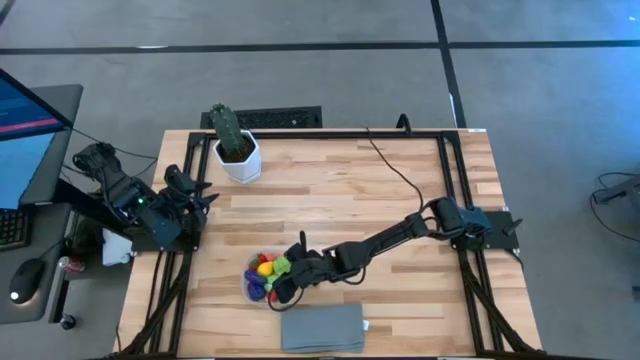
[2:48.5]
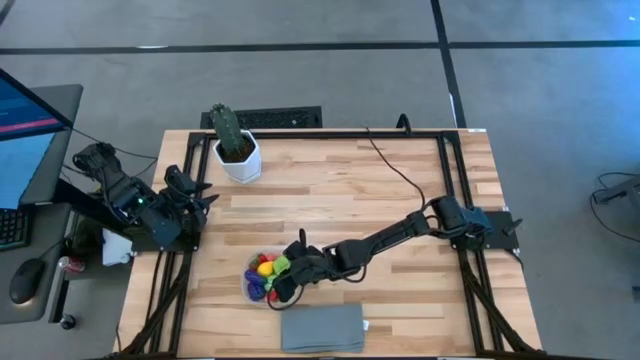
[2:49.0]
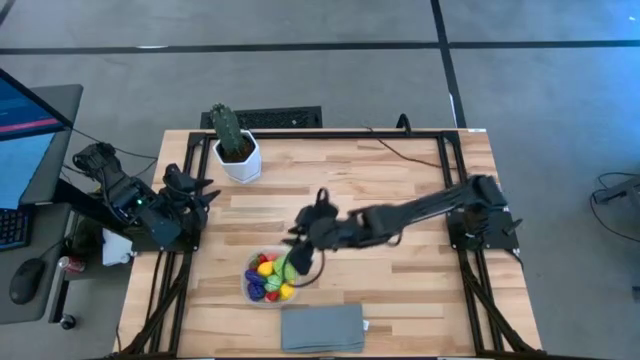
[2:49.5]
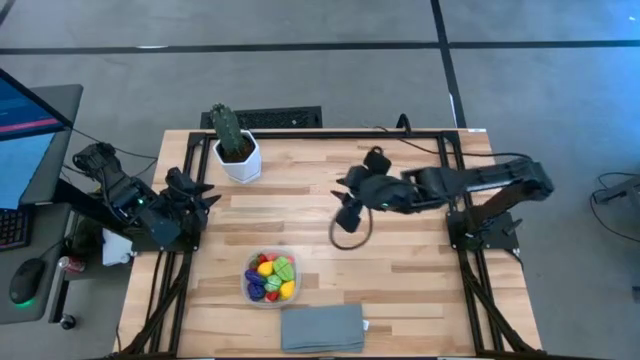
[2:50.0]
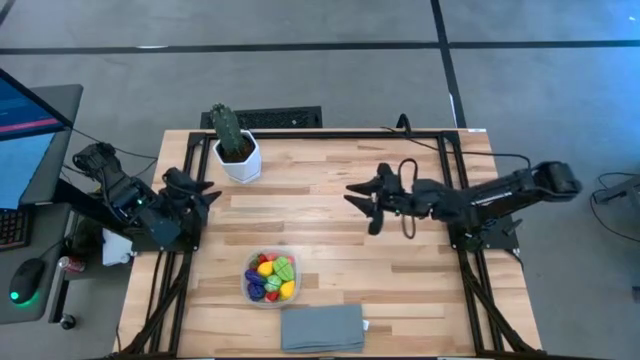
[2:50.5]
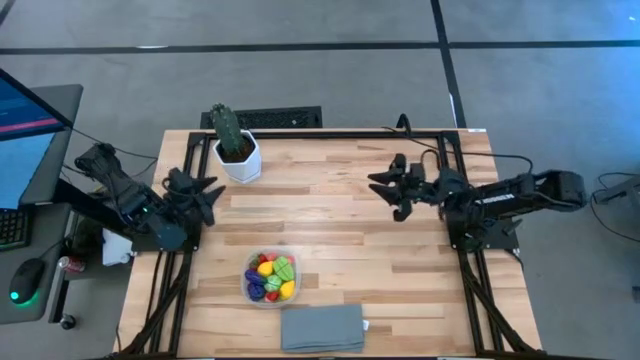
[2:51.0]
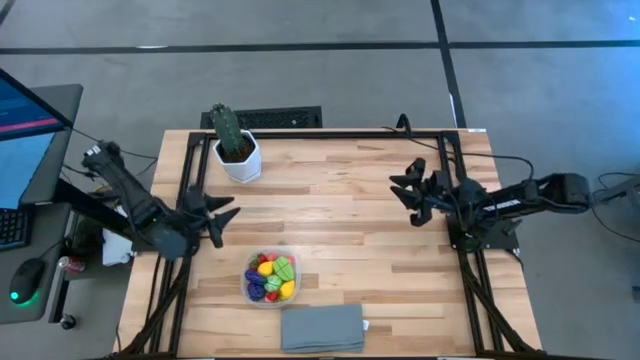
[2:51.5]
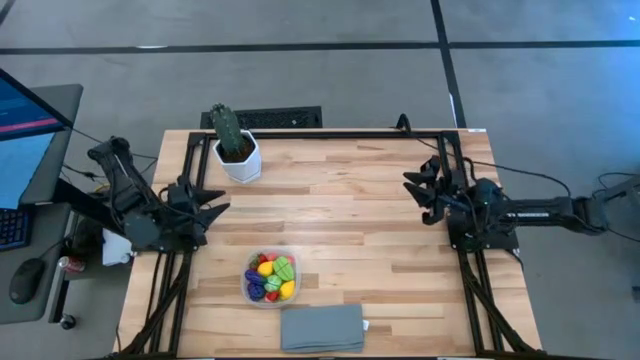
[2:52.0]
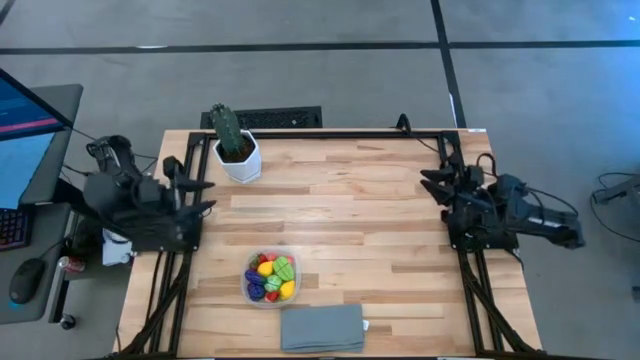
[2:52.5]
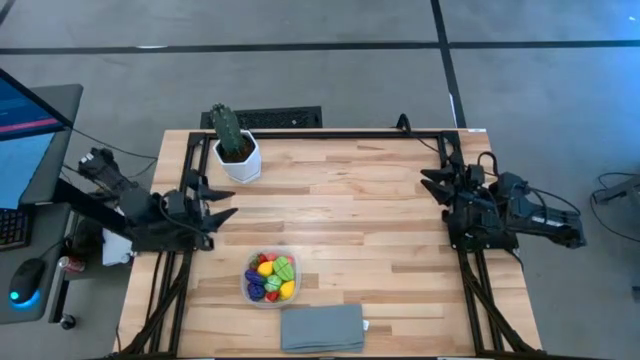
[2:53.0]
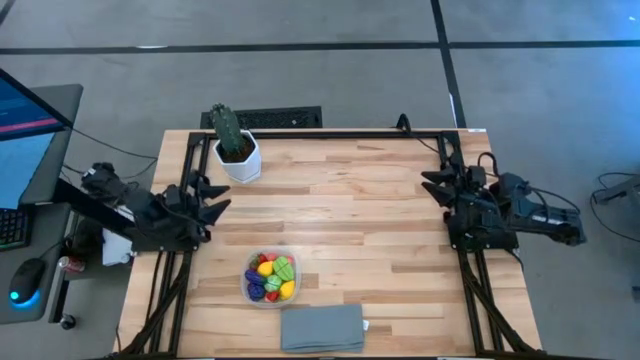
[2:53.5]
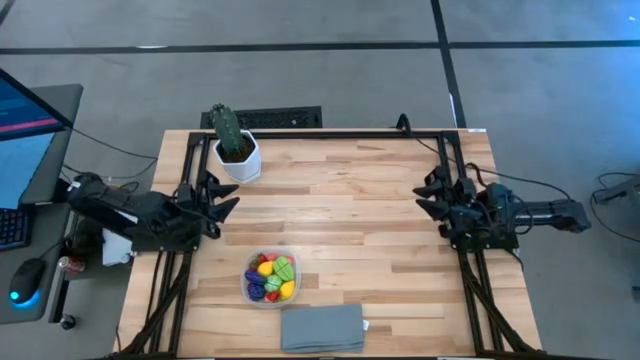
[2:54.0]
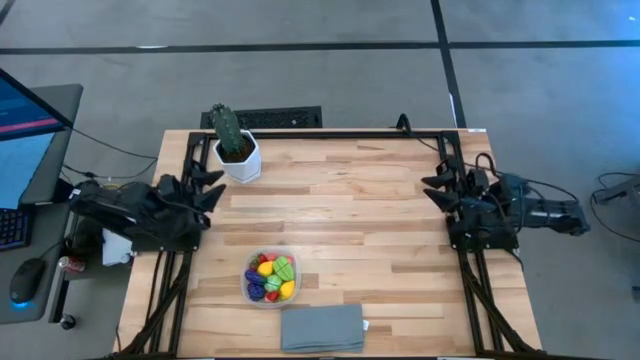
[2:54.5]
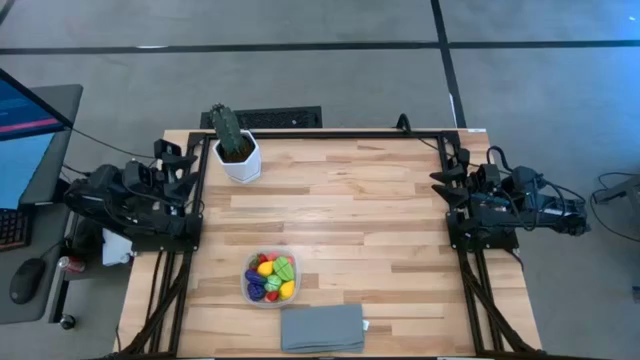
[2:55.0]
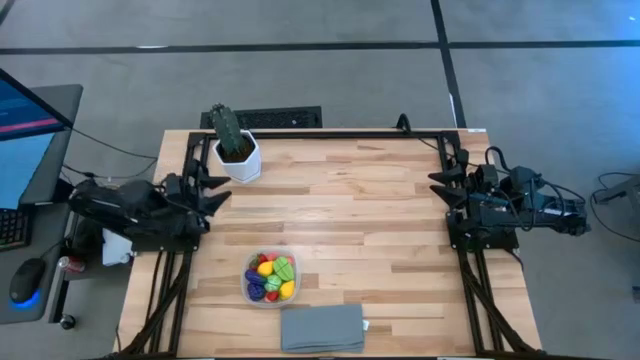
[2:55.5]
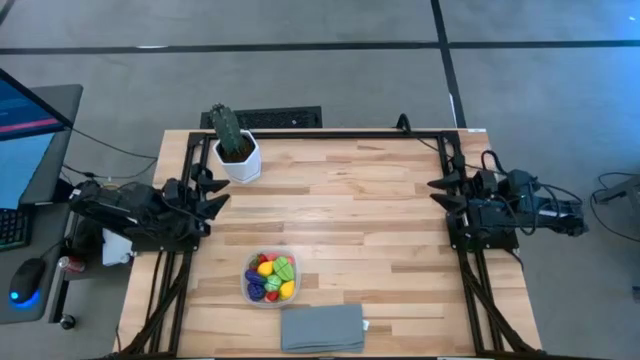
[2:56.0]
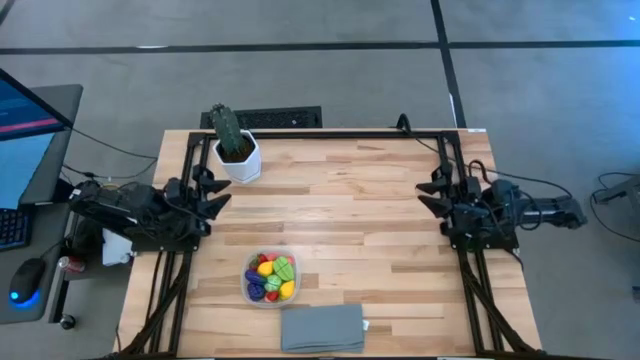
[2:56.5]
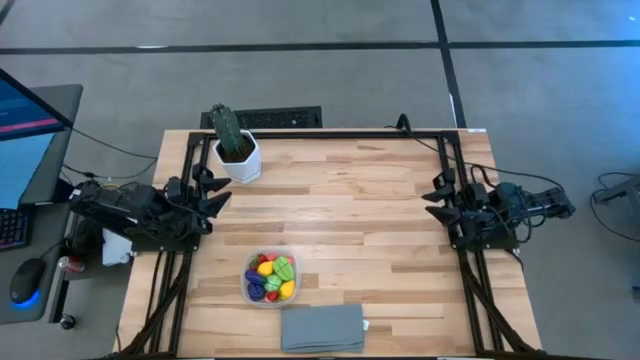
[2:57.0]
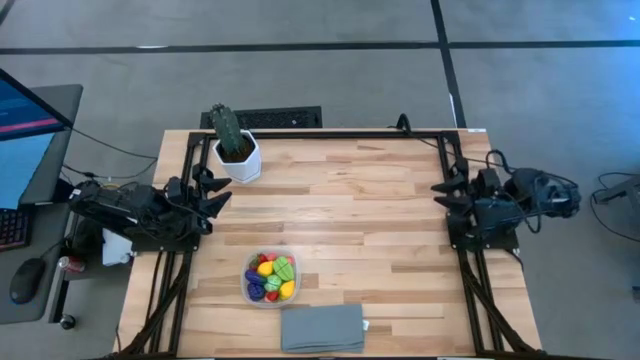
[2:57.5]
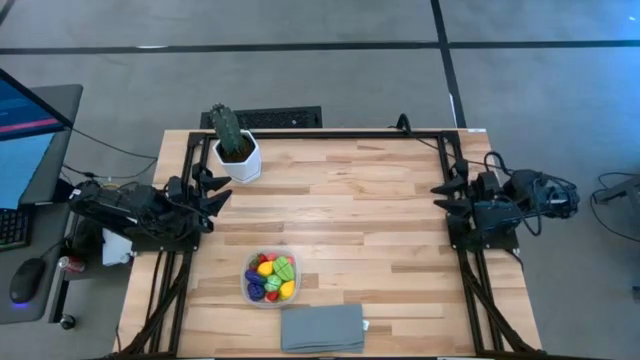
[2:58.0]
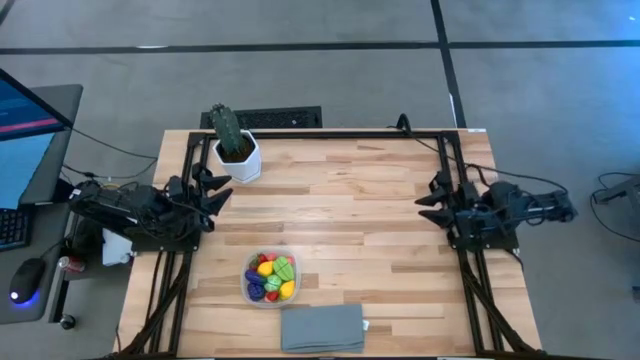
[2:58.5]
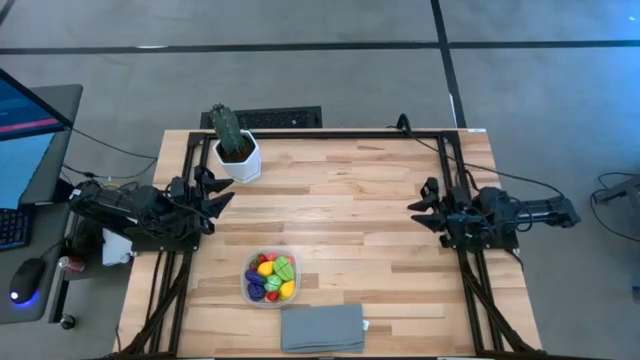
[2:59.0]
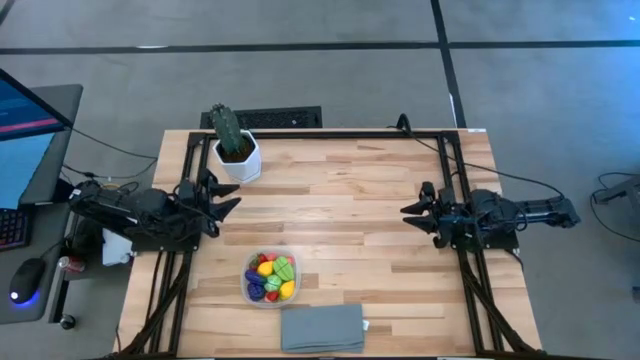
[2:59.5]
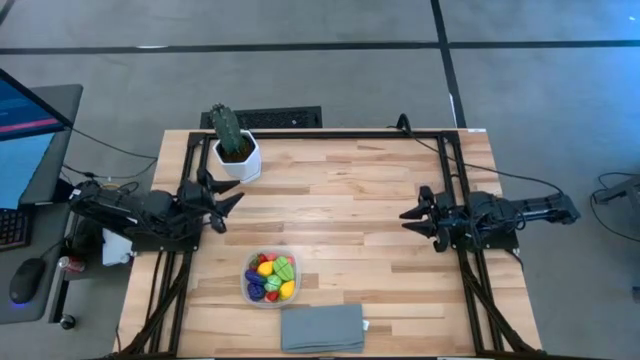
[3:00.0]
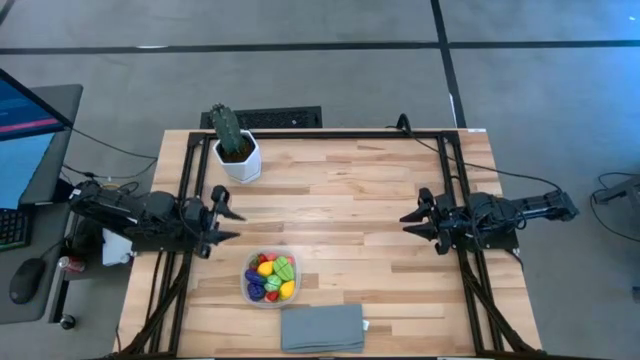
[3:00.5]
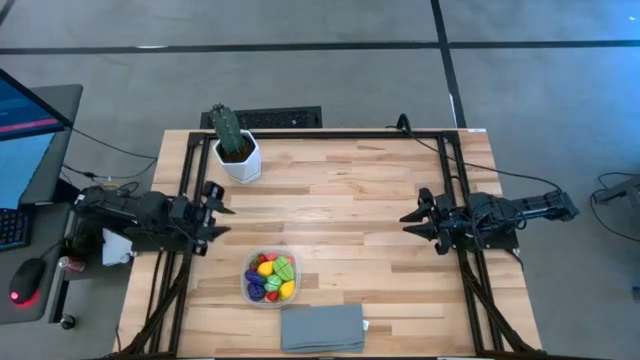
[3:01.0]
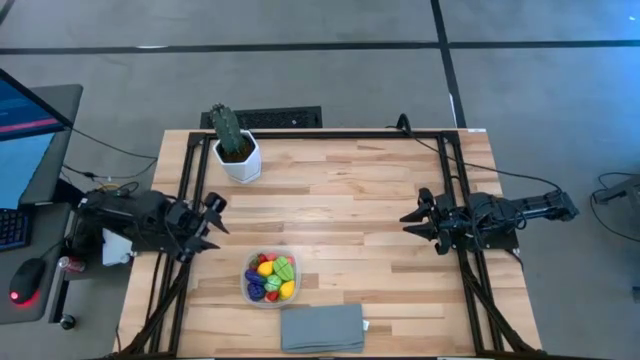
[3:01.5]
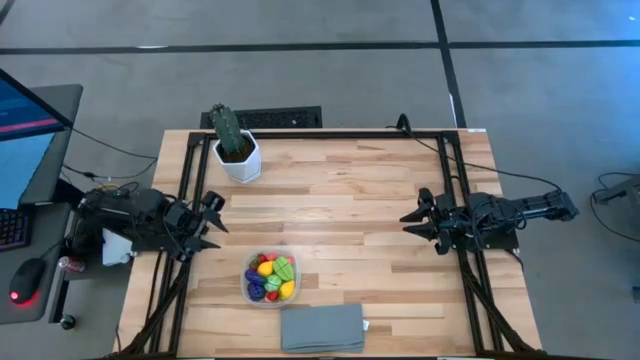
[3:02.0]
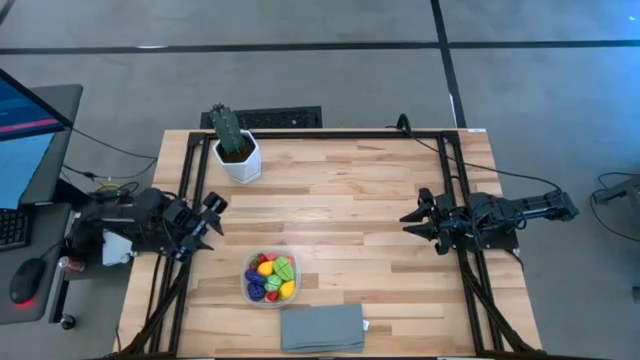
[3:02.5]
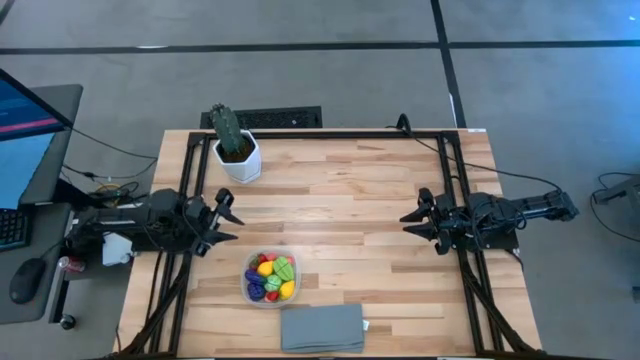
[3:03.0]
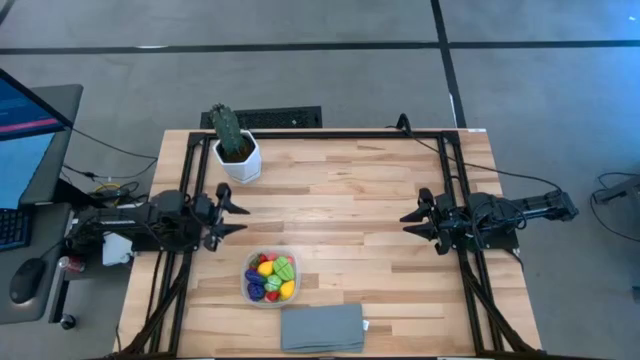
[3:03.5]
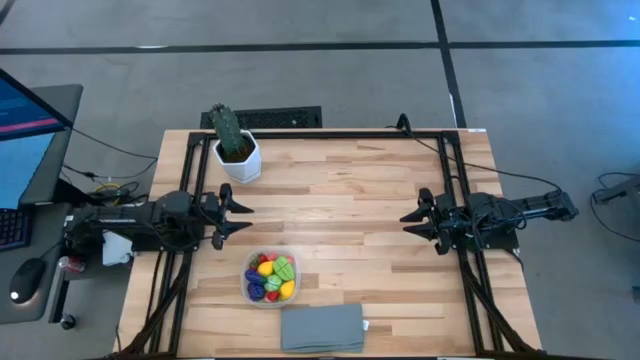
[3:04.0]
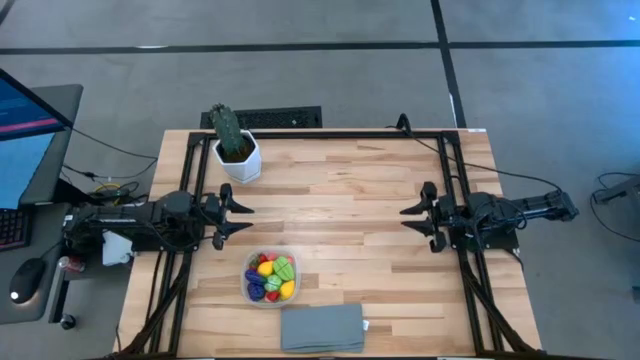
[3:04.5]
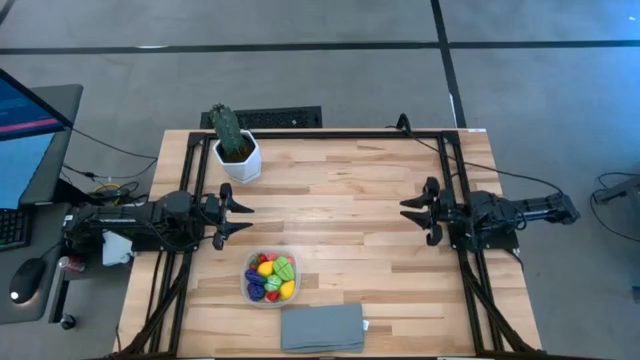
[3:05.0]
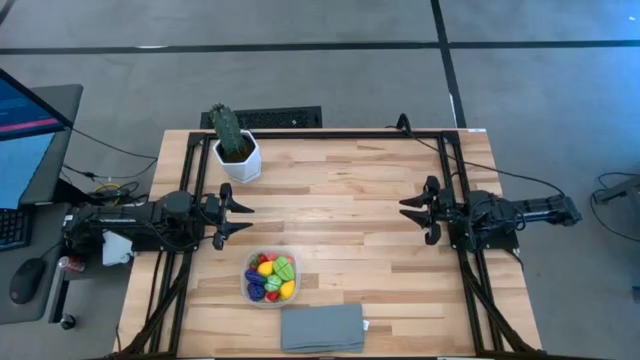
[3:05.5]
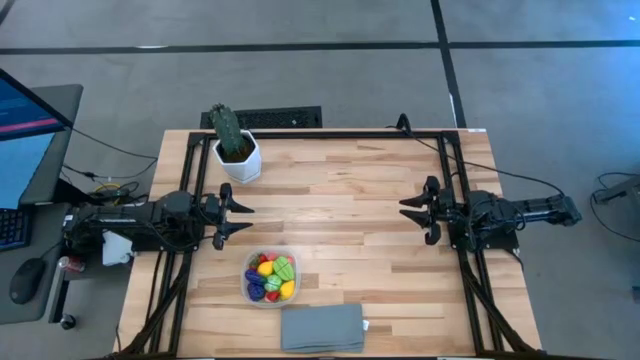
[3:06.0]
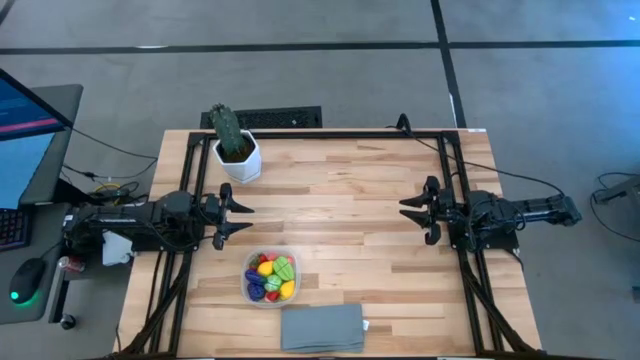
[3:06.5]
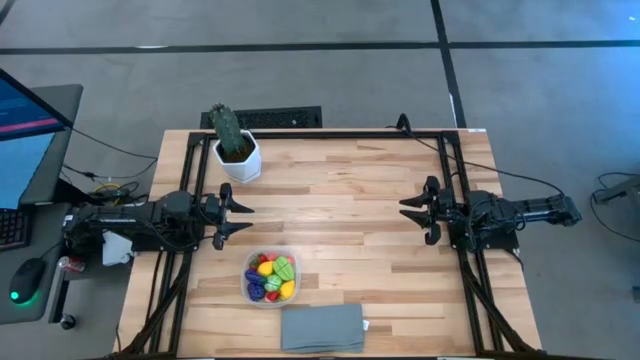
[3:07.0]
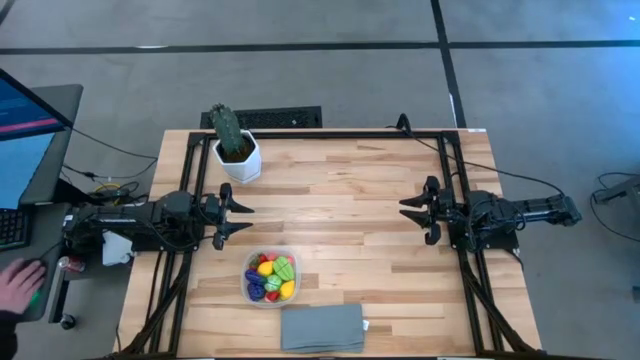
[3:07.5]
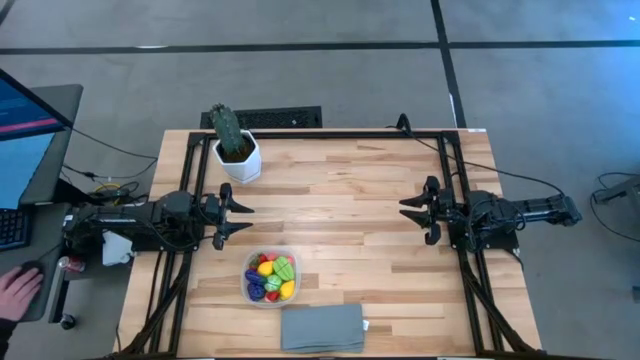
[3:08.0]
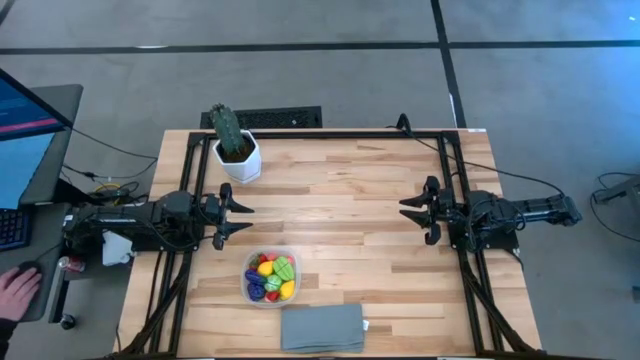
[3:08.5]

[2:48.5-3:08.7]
Task: Pick and placing Produce into tupperware
Return to Home Position
